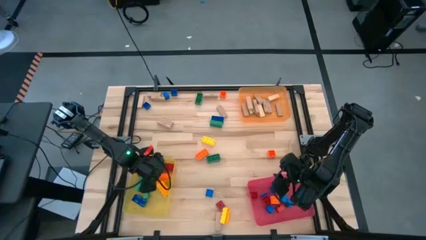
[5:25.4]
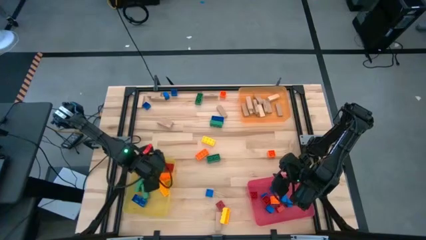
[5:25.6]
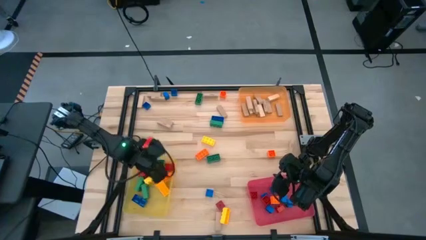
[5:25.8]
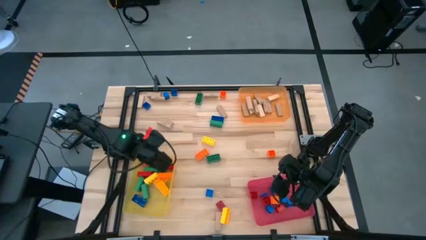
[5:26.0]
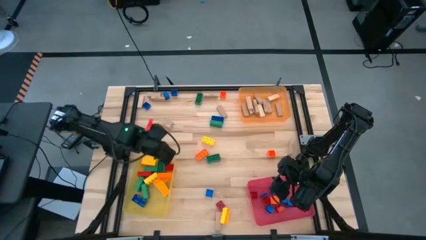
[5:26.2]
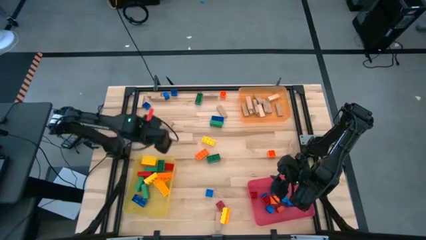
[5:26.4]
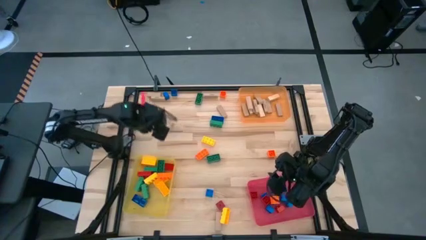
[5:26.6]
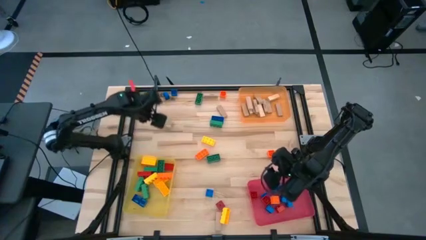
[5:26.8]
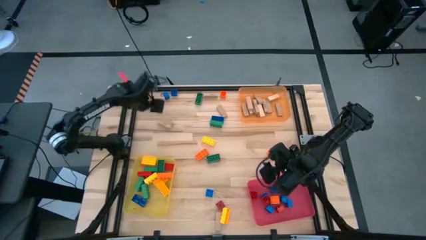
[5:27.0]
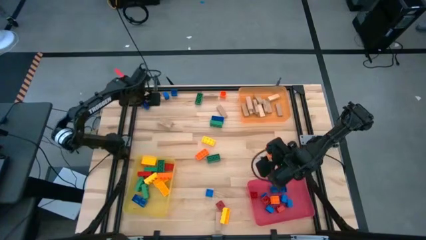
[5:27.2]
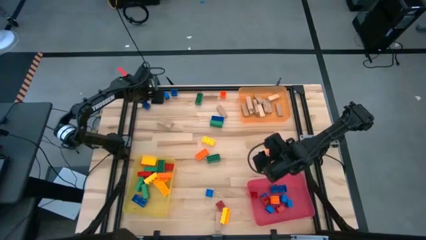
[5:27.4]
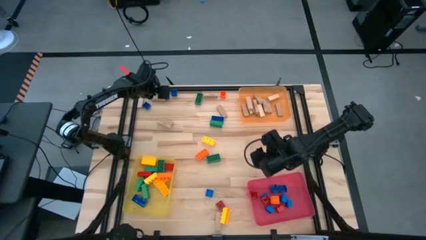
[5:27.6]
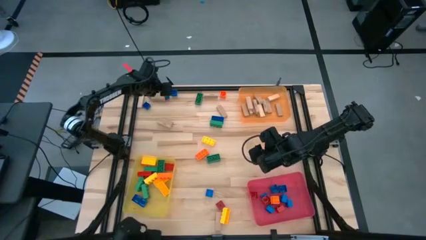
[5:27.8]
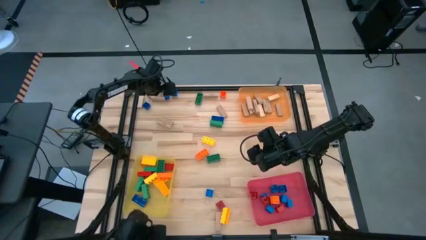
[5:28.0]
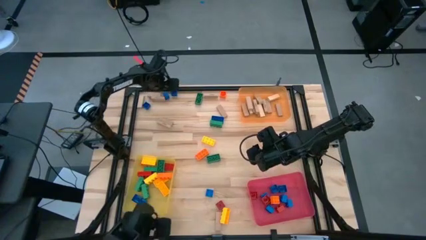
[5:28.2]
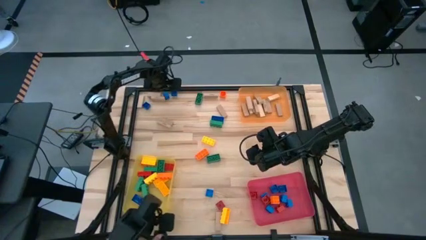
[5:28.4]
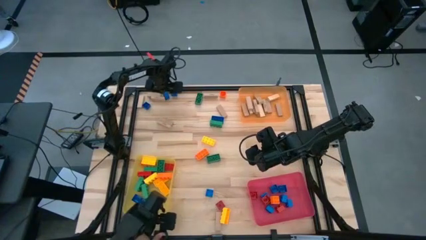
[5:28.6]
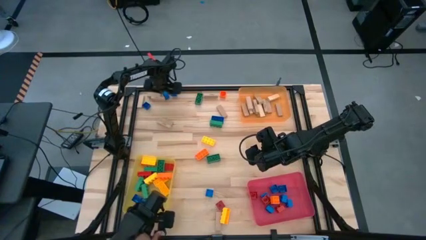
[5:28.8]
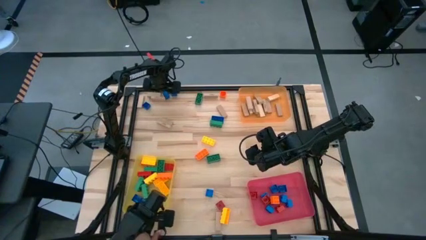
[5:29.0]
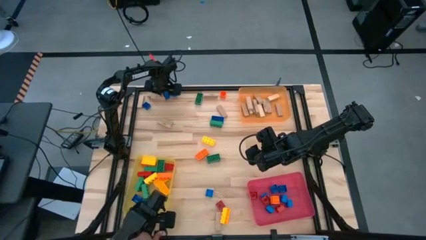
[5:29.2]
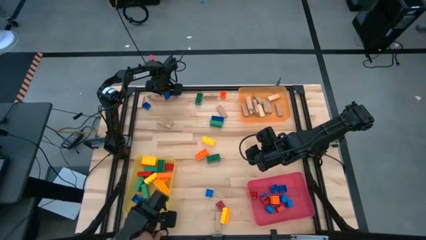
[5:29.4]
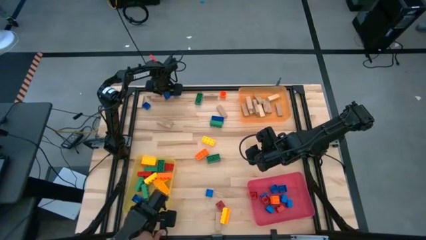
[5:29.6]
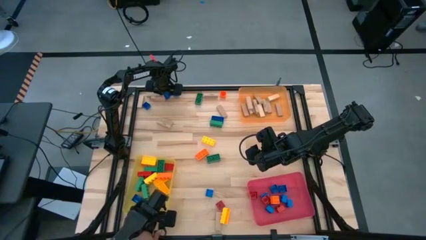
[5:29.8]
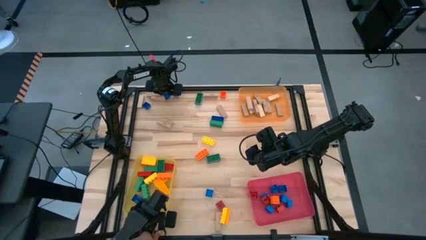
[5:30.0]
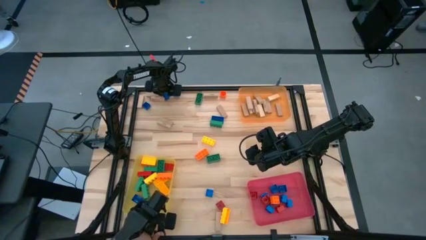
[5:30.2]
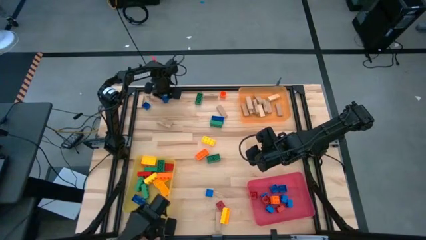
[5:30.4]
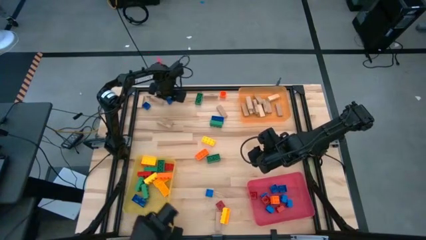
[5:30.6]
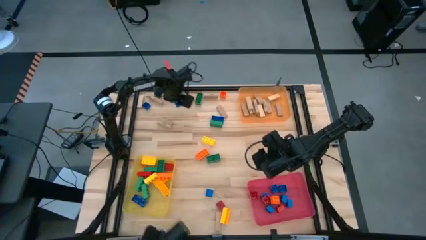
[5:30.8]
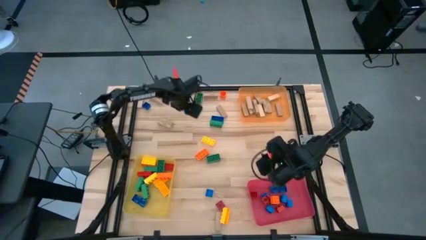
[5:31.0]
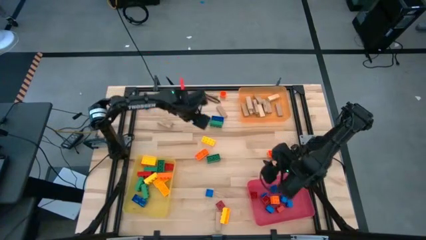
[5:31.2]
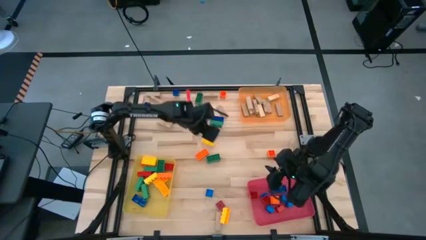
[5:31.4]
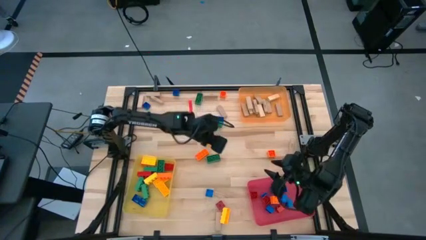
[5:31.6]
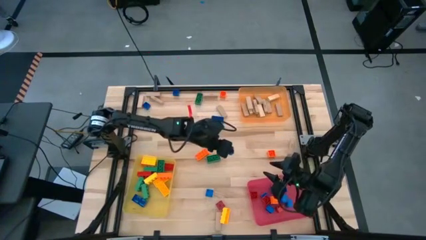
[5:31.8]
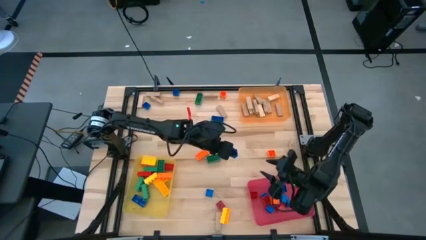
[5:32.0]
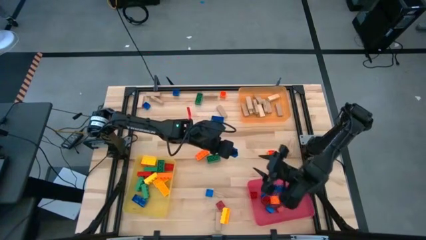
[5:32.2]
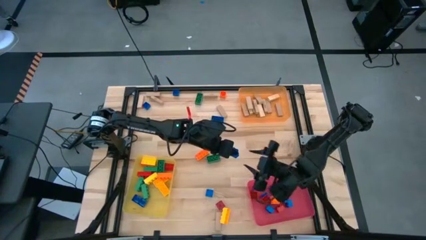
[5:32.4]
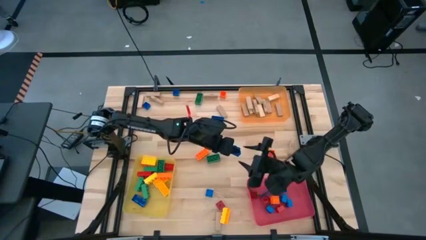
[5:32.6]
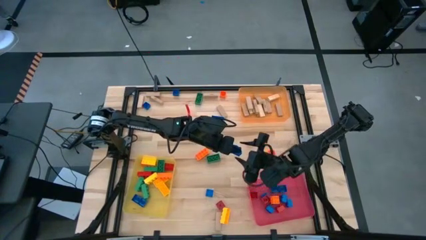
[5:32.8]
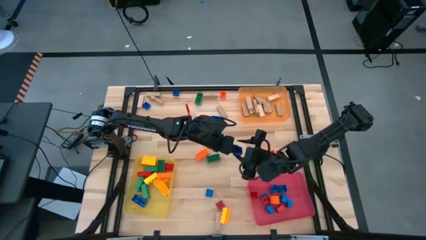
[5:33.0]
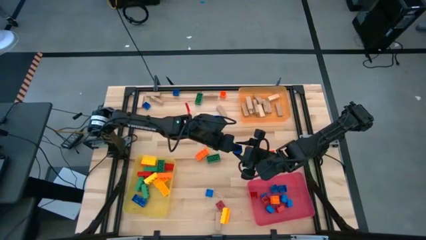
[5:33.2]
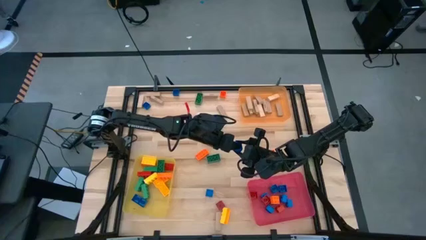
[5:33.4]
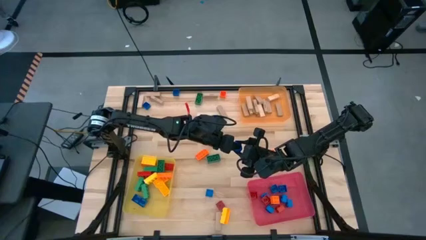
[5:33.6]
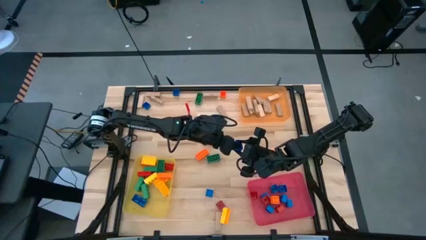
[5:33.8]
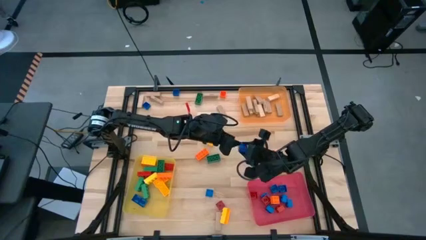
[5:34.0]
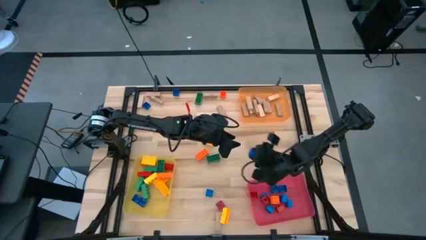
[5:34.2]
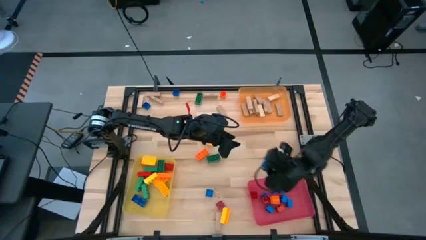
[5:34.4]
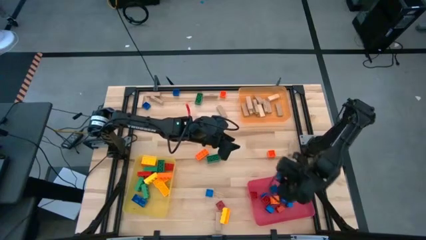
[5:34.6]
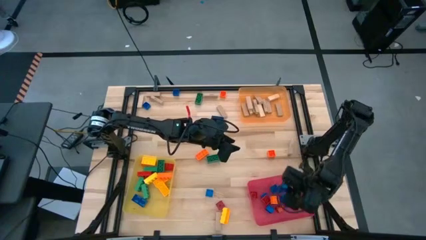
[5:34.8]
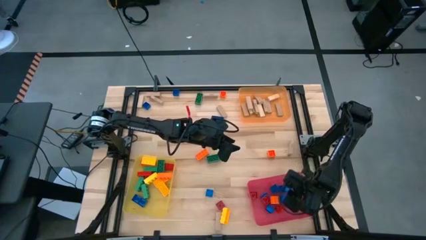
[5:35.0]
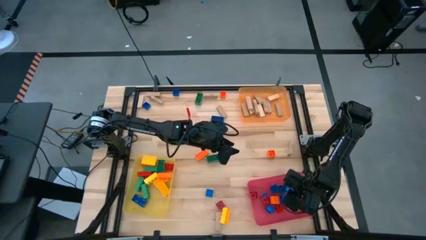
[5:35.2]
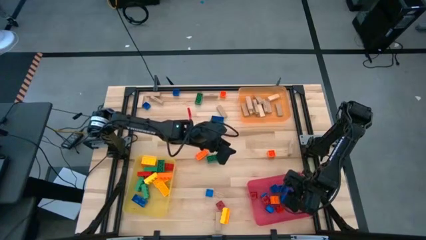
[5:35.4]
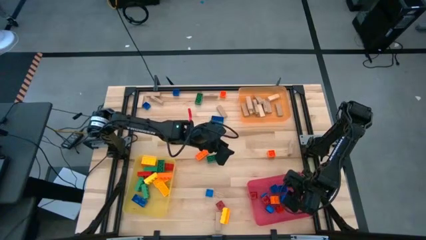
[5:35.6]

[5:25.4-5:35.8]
Task: Sort blocks by size
Put the small blue game piece into the red bin

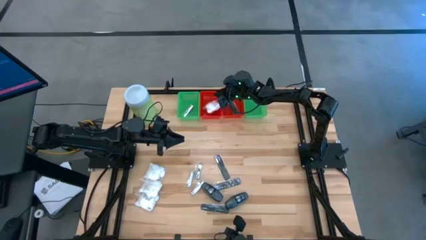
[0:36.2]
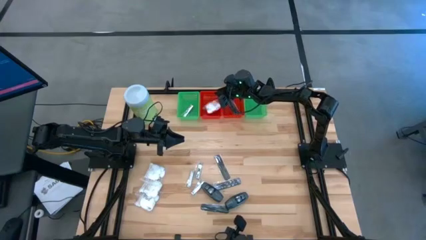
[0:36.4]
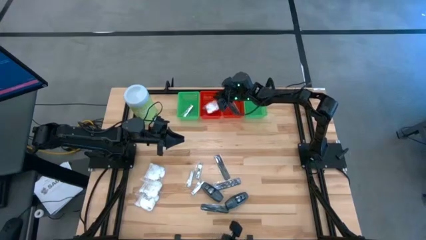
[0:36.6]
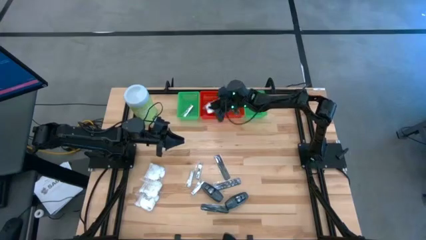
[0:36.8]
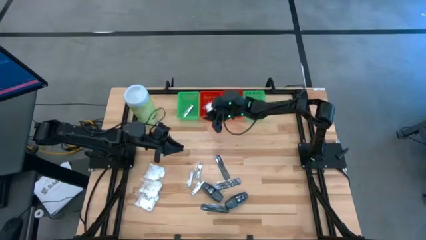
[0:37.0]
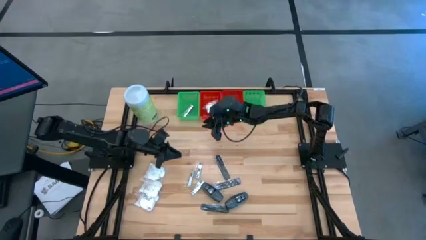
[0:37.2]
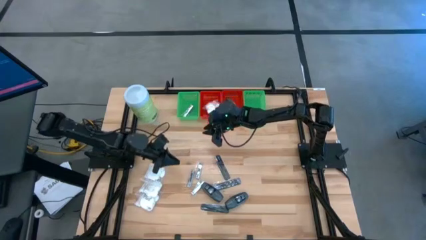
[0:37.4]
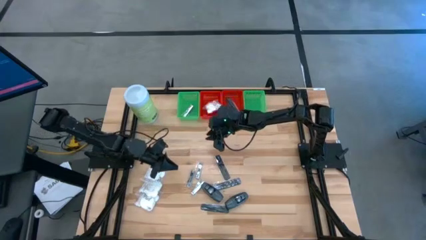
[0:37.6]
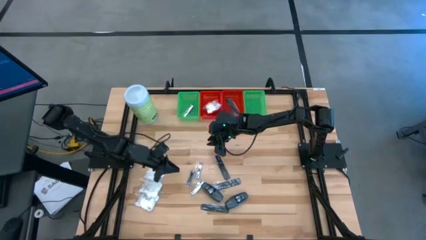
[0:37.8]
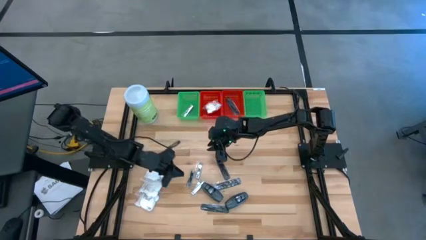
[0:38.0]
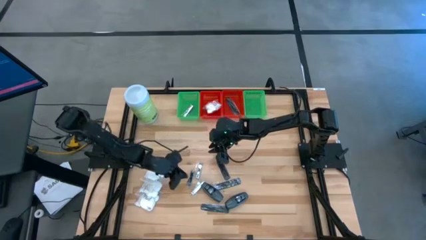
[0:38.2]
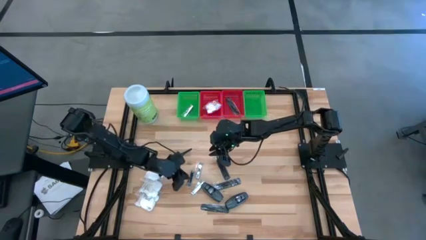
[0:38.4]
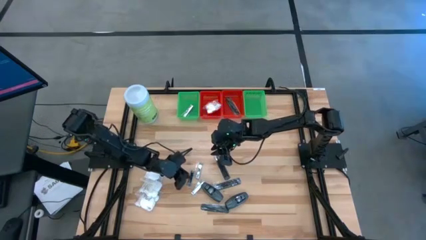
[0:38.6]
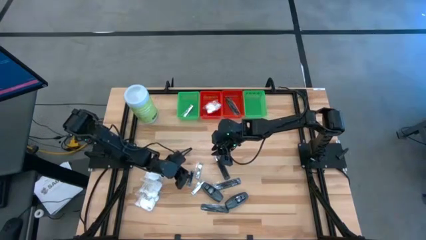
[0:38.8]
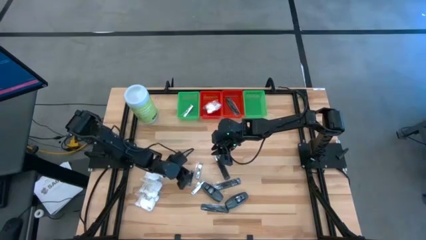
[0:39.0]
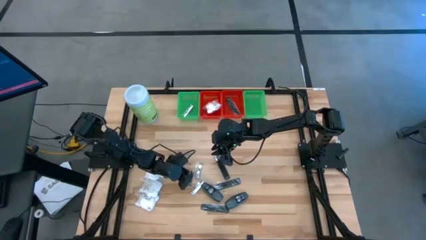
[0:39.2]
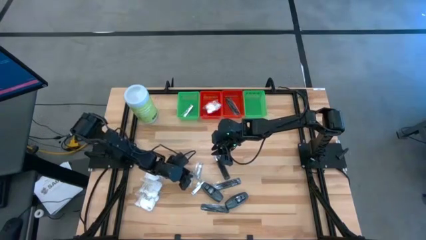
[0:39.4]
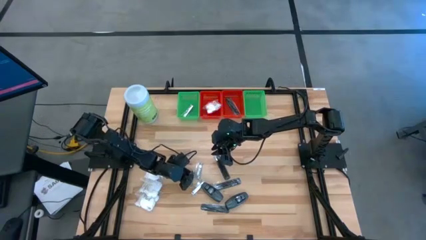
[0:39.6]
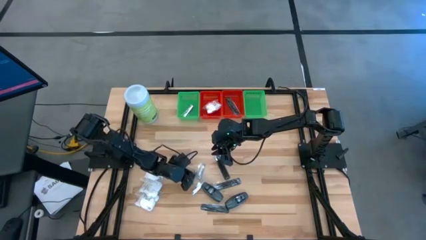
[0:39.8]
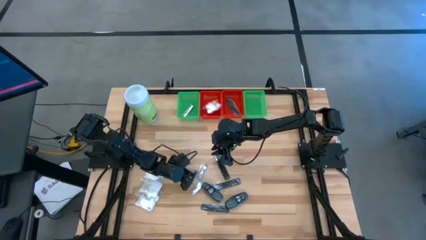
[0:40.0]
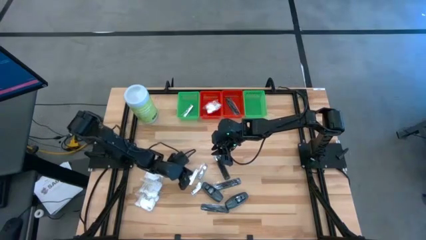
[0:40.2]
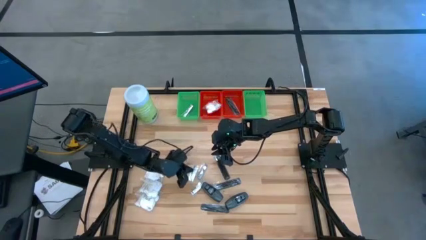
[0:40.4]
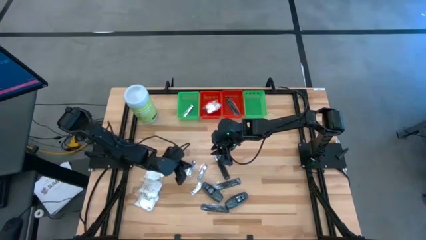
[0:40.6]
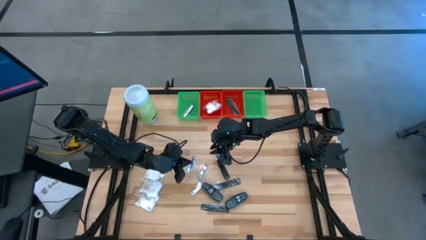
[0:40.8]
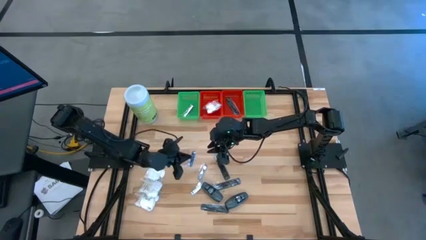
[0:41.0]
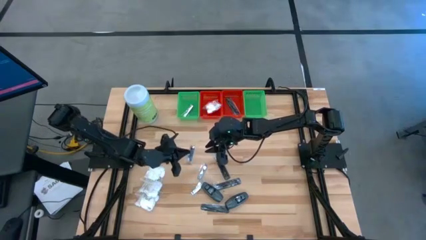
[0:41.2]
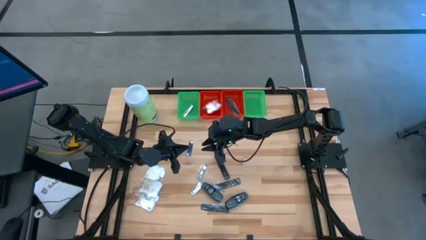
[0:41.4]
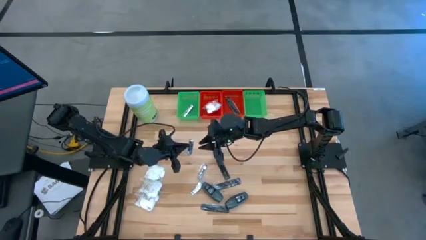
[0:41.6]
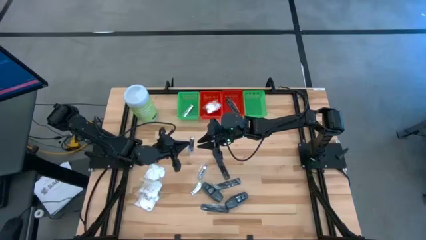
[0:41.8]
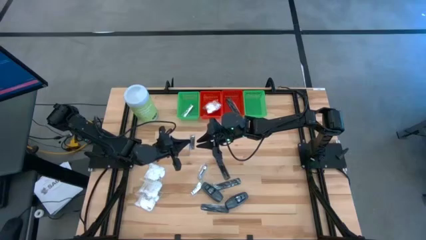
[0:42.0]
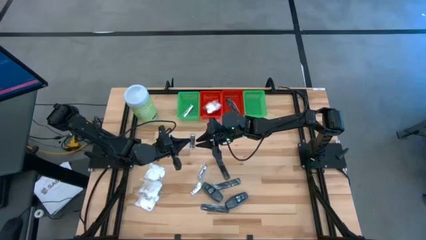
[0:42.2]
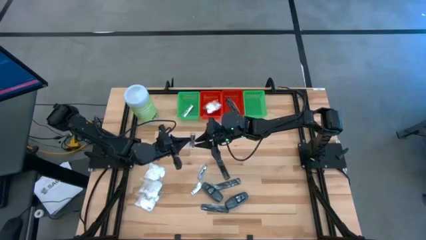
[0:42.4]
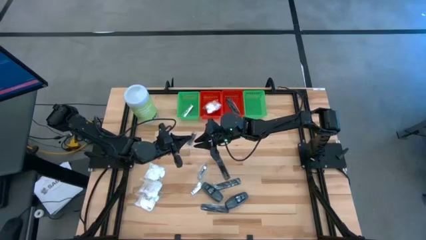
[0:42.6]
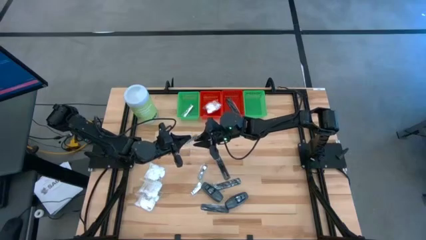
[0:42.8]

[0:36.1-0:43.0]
Task: Pick & Place Travel size toiletries
Put the silver nail cutter into the left green bin
